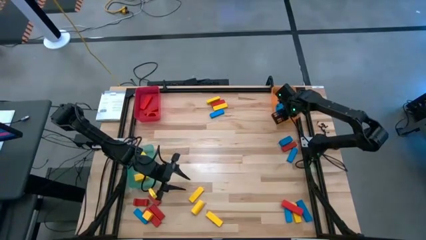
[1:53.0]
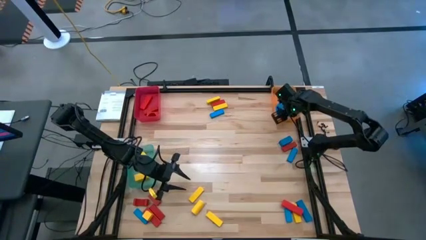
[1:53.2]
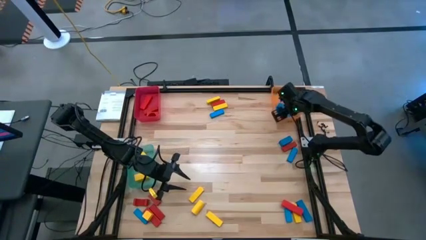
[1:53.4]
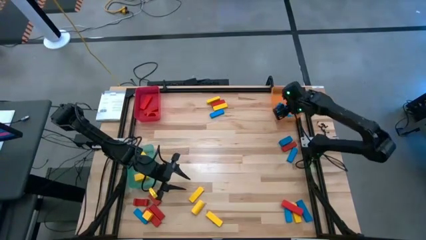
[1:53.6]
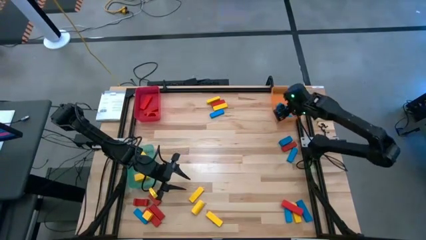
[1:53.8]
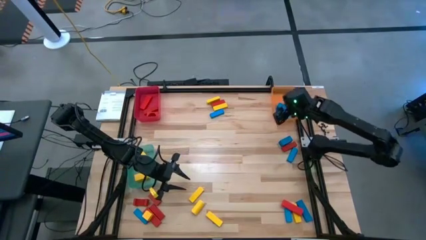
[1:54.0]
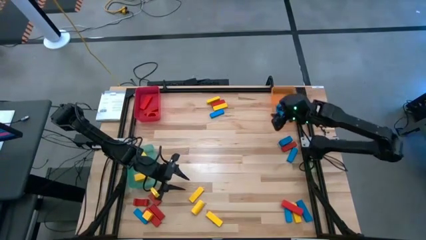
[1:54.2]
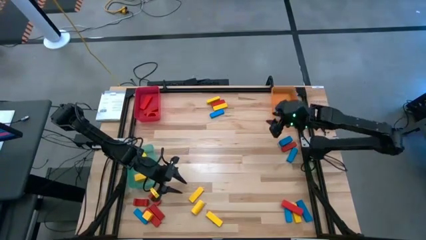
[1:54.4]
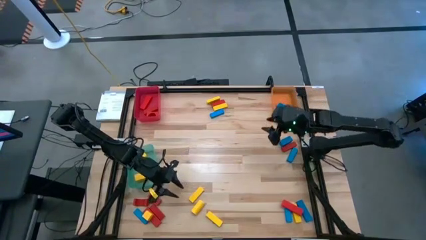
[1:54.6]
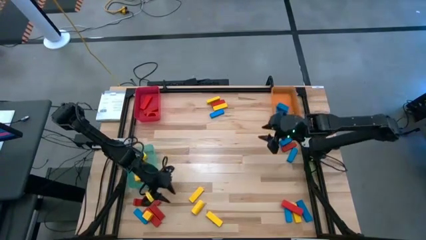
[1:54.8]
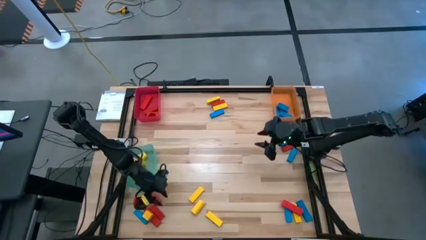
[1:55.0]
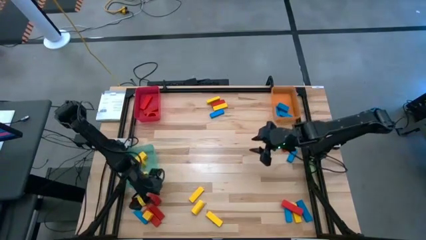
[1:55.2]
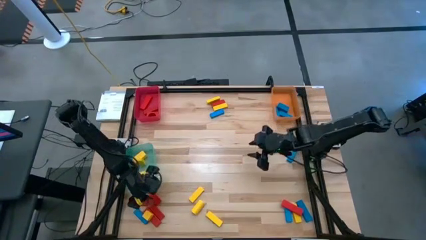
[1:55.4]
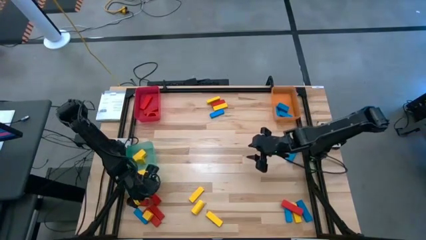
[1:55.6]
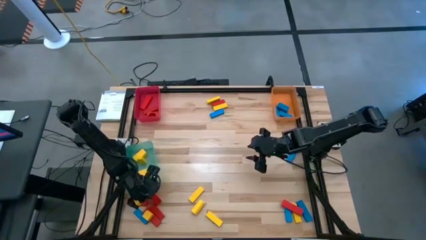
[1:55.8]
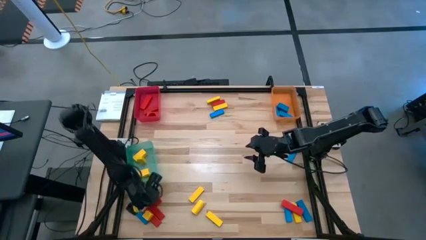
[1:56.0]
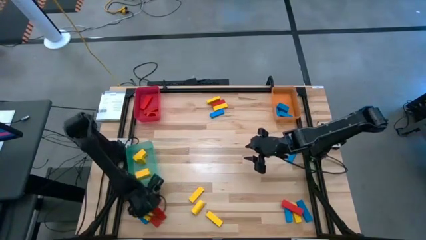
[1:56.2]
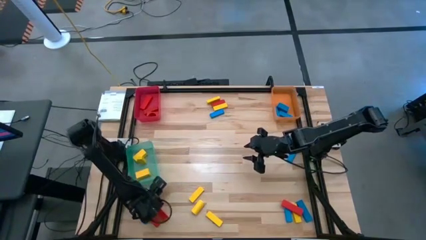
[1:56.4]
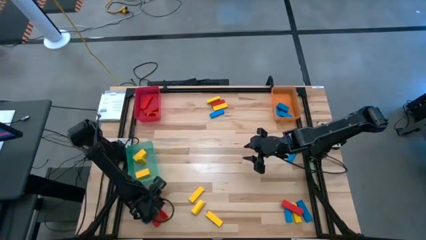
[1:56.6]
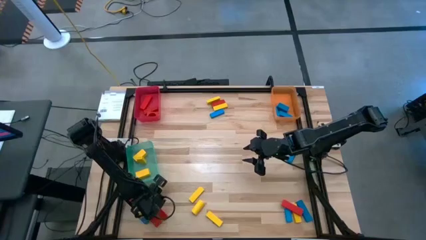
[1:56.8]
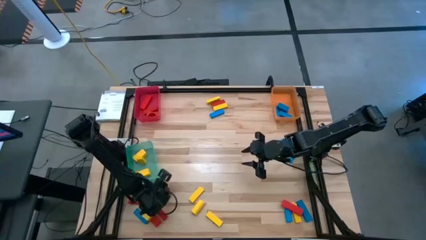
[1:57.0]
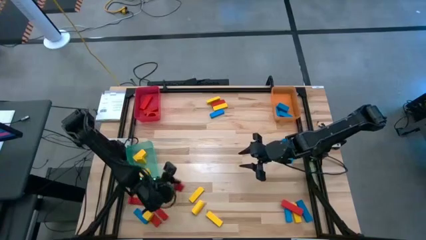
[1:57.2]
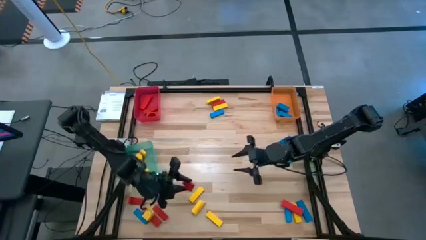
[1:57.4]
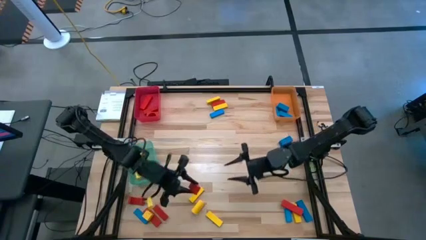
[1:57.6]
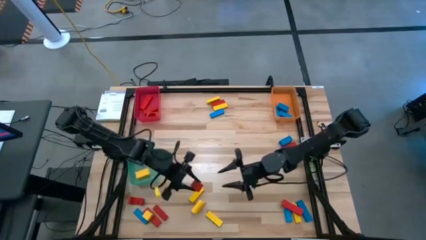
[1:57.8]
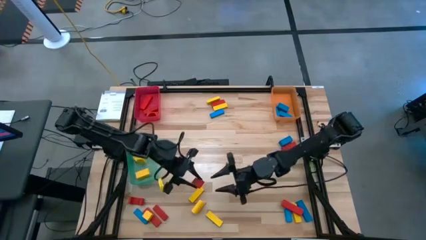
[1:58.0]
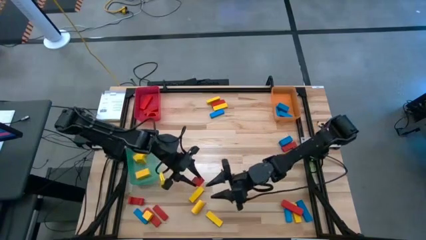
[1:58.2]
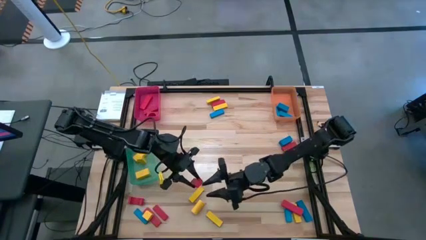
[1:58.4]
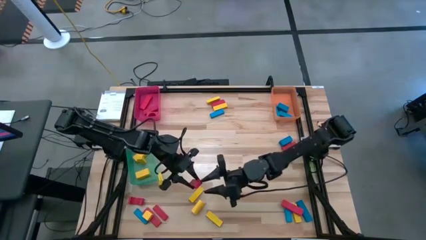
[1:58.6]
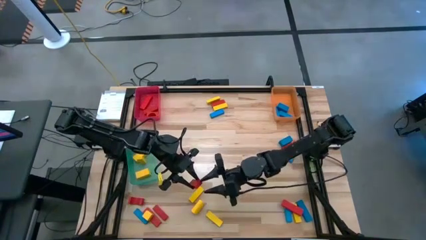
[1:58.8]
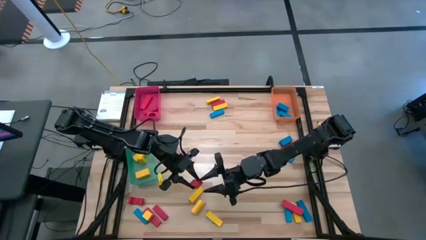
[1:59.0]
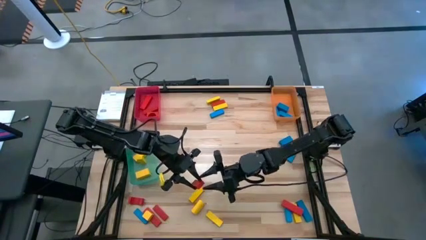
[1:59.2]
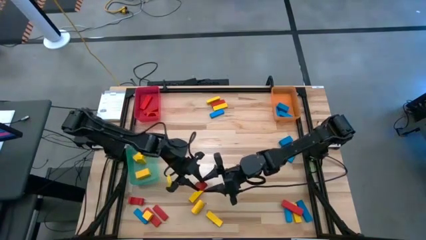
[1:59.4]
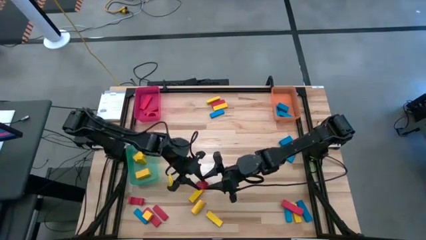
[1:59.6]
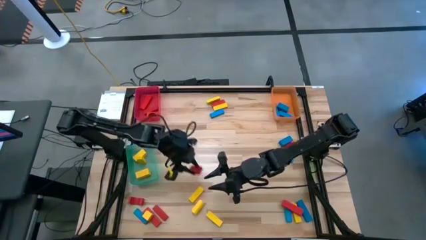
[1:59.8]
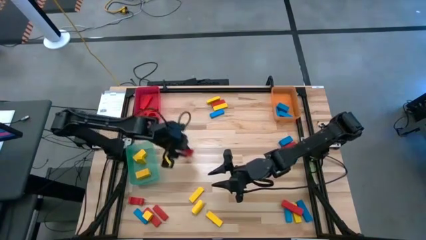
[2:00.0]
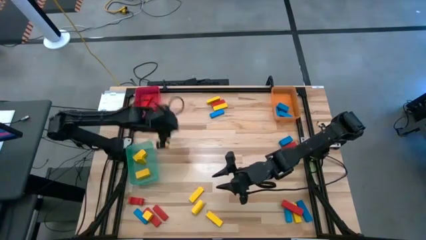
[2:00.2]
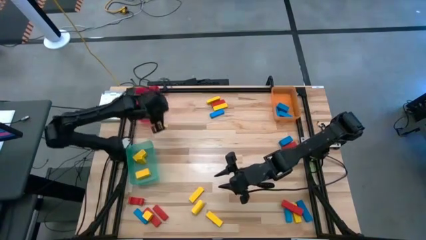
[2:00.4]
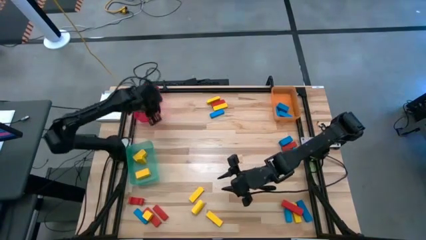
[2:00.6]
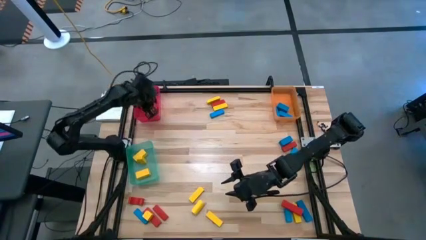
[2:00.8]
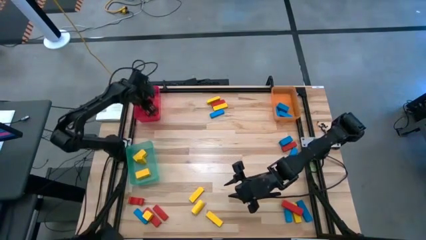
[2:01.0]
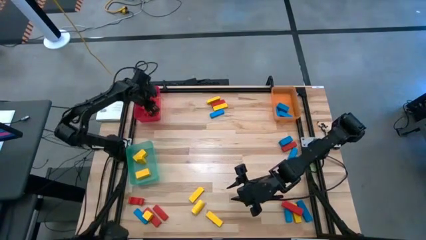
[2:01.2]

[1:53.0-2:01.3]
Task: Sort blocks
Put the red block into the red bin

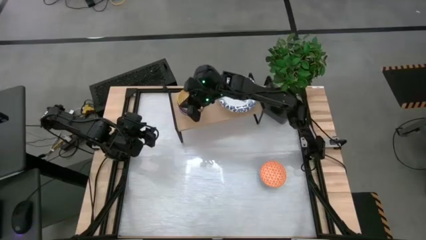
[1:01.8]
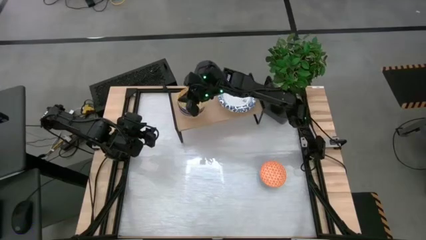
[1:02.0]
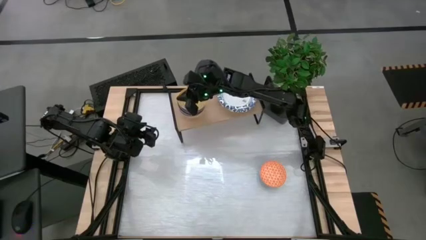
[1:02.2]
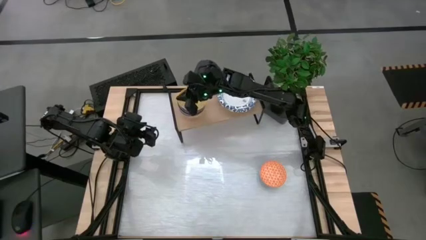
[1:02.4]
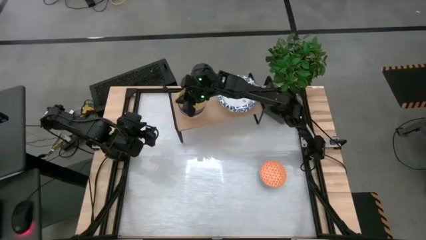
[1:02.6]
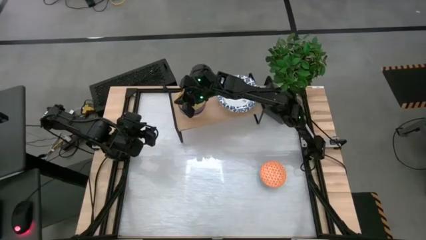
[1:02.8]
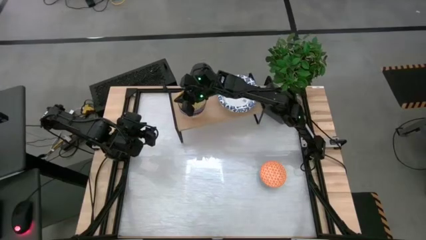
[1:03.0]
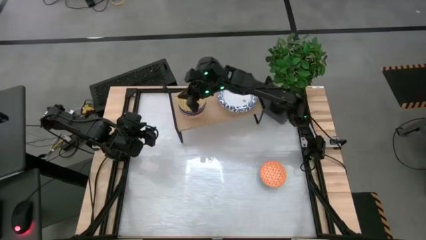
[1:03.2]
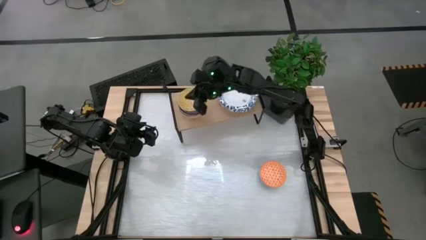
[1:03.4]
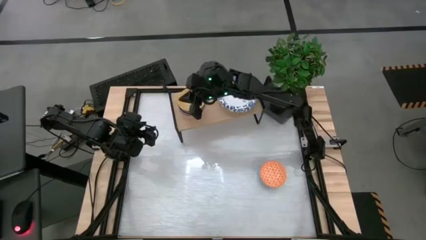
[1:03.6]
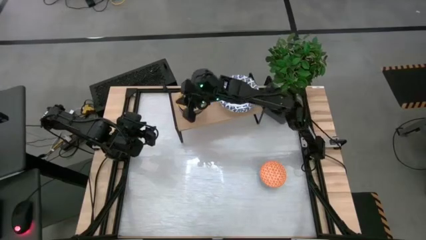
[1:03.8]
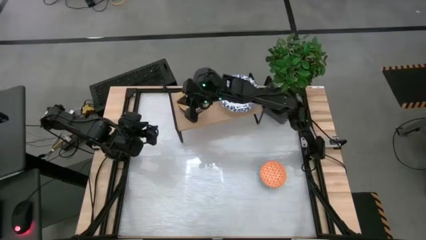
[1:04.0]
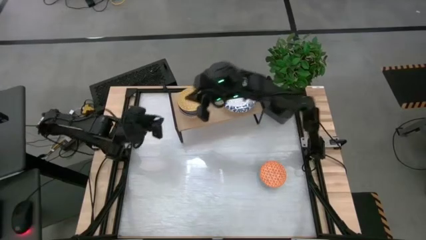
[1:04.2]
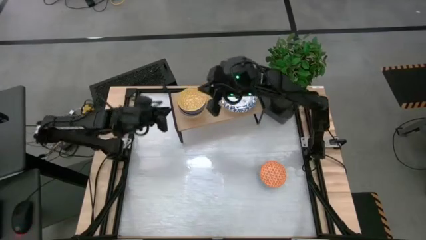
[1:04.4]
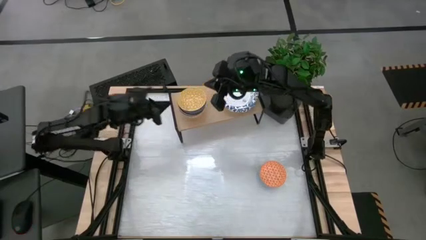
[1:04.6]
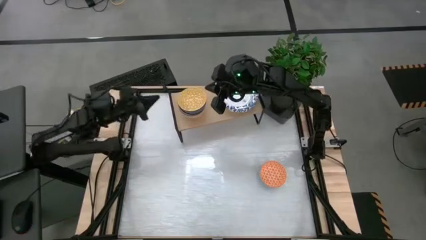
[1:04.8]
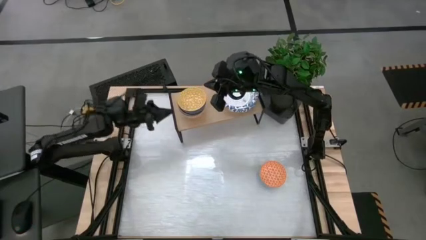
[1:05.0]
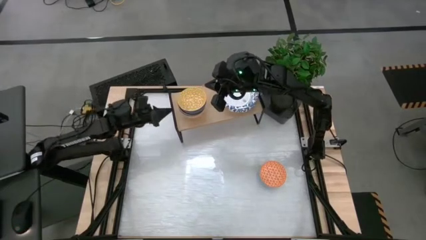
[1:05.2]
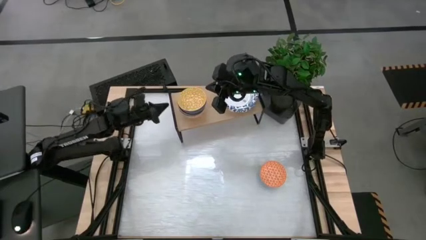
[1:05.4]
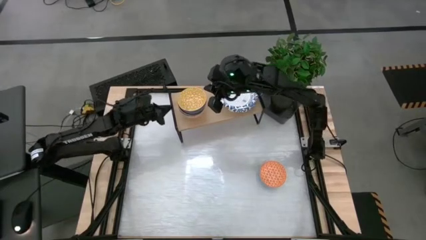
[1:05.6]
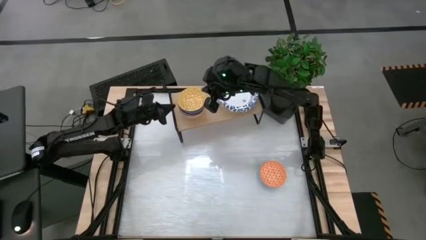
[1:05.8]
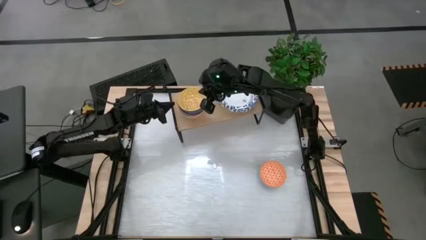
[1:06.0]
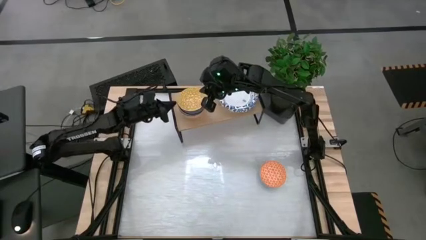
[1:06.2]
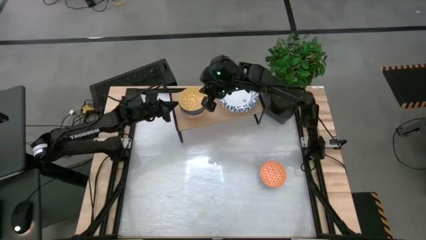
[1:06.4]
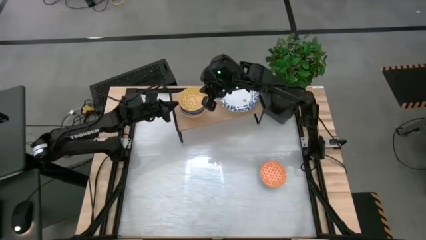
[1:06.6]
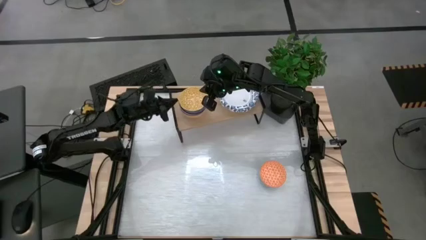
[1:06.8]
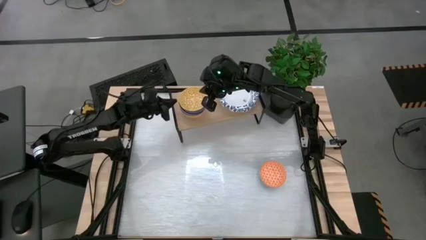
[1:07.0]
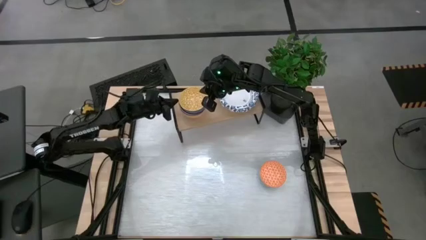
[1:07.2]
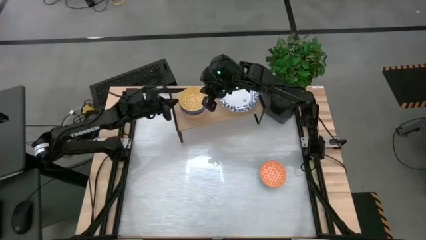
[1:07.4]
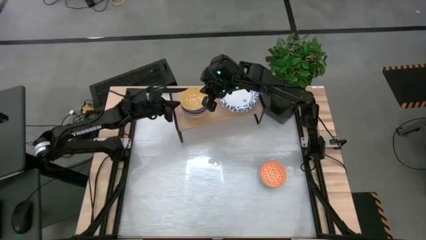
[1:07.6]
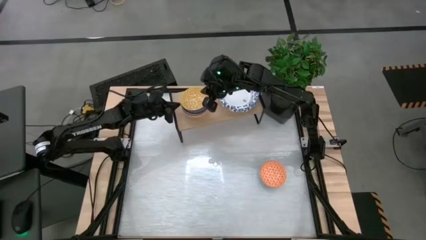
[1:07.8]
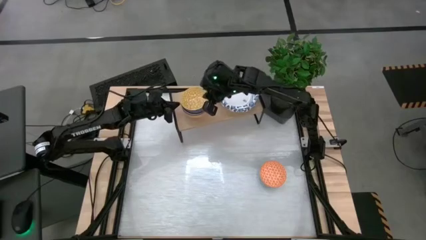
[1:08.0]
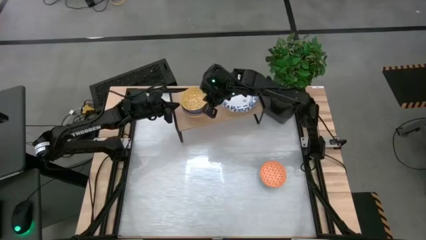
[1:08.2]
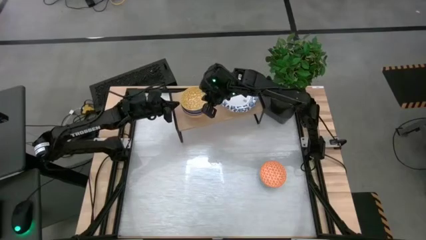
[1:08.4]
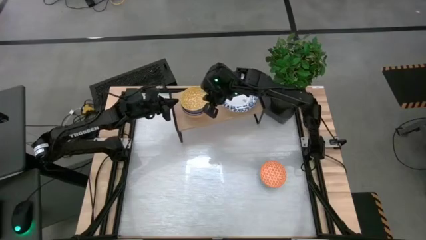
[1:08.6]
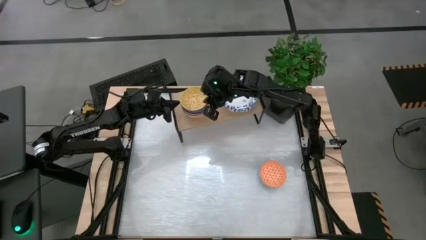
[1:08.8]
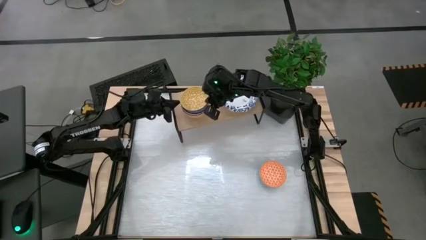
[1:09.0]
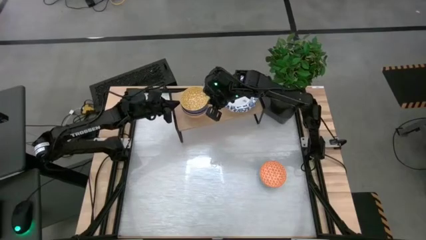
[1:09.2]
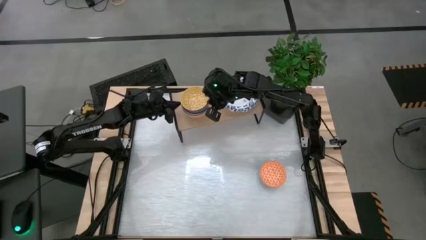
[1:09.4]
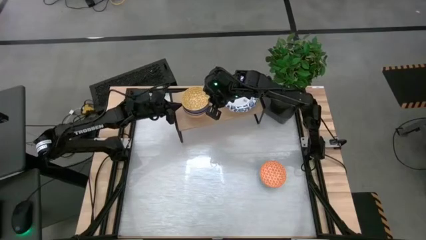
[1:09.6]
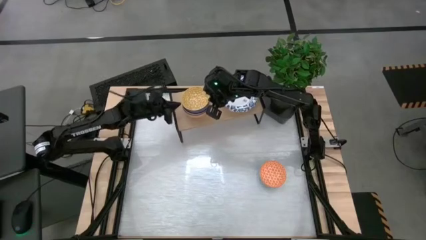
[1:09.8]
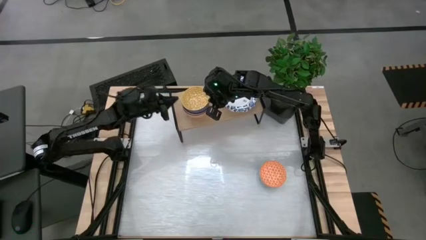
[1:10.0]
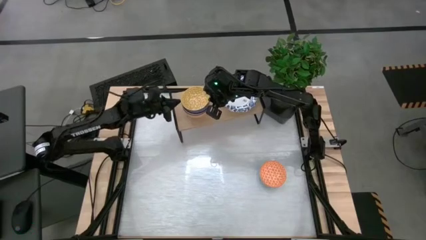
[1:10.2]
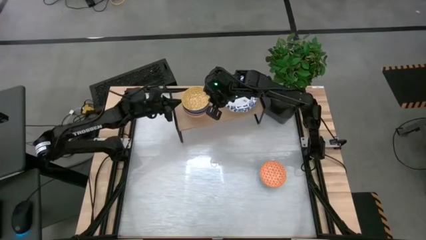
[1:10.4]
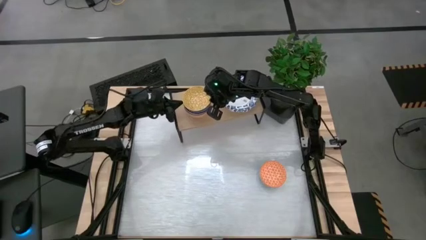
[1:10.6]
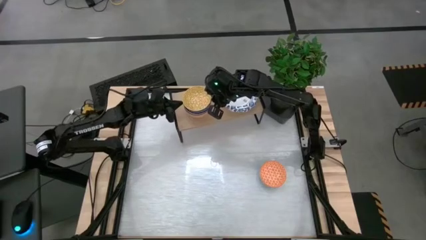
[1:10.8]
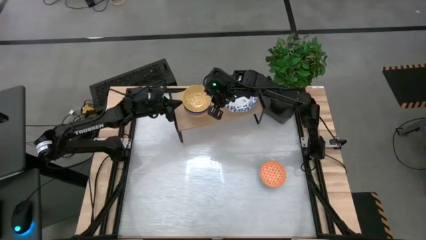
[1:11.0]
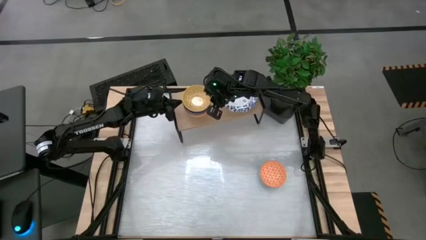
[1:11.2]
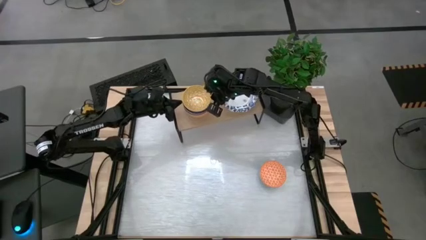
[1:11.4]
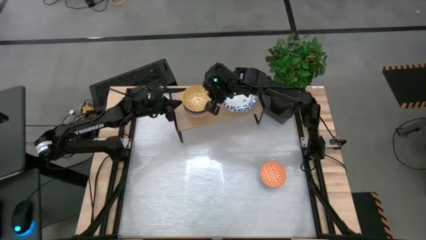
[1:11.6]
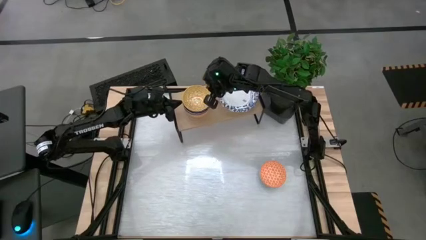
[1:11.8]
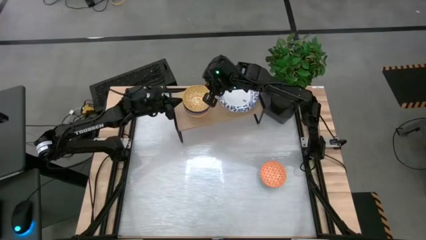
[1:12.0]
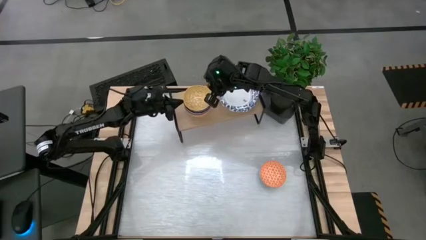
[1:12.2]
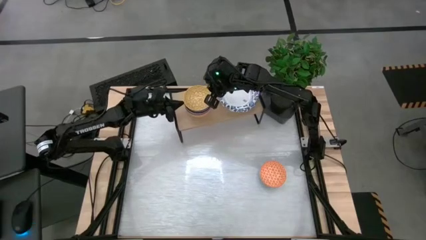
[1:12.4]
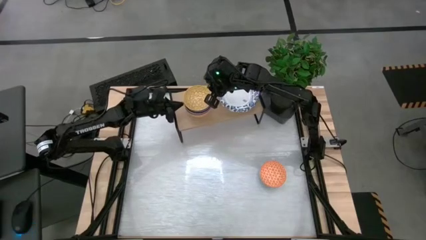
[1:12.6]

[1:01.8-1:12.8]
Task: Place and stack bowls onto a shelf
Stack the yellow bowl on top of the blue bowl on the shelf
